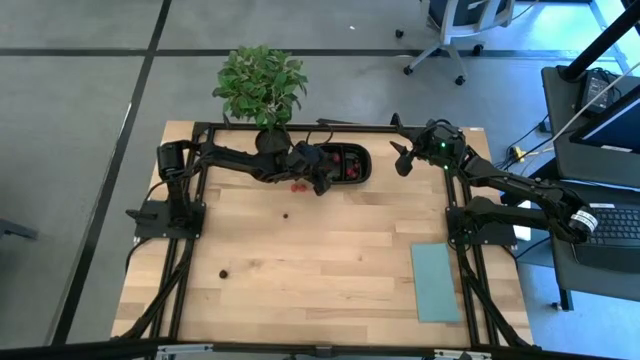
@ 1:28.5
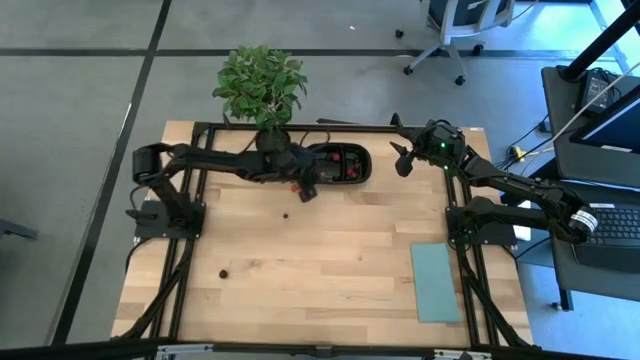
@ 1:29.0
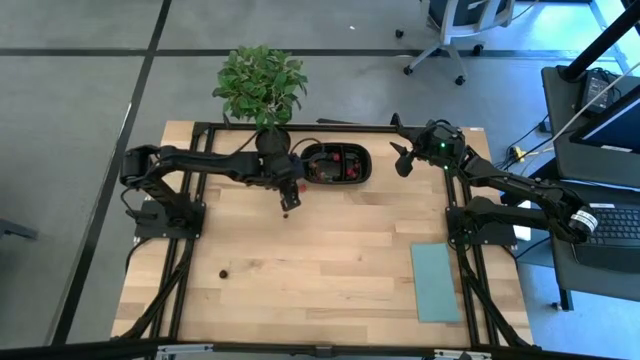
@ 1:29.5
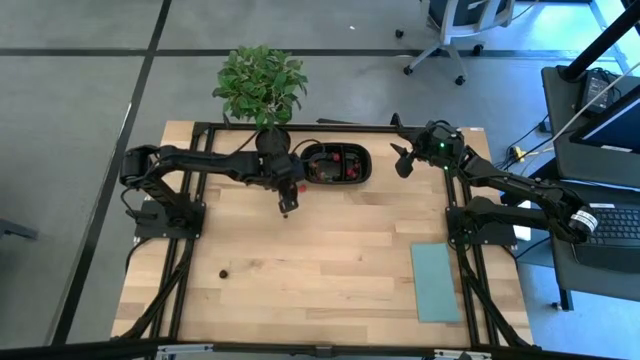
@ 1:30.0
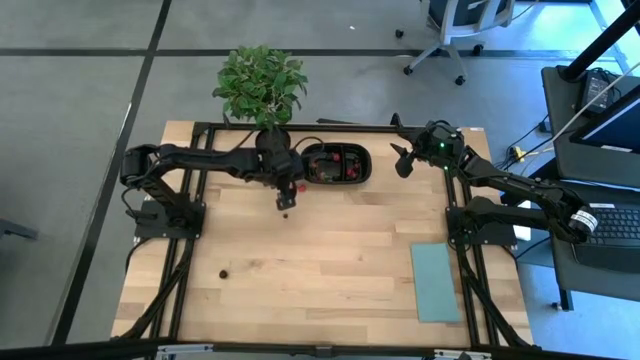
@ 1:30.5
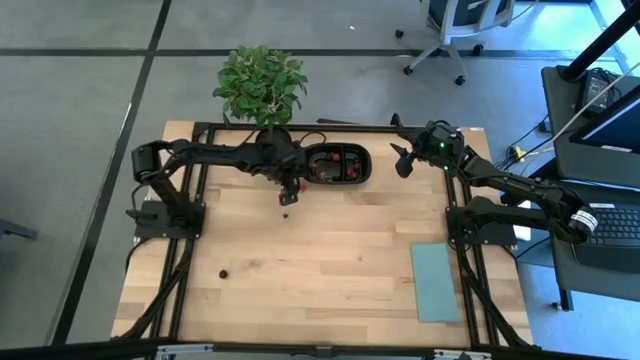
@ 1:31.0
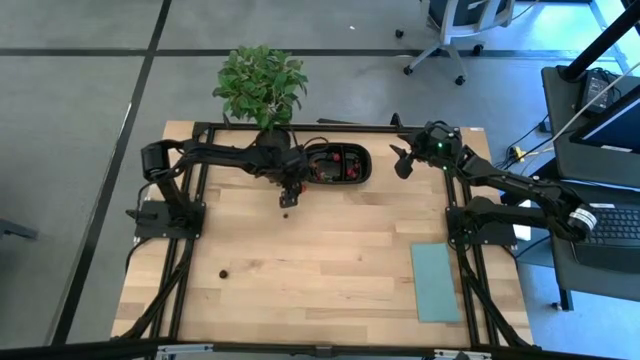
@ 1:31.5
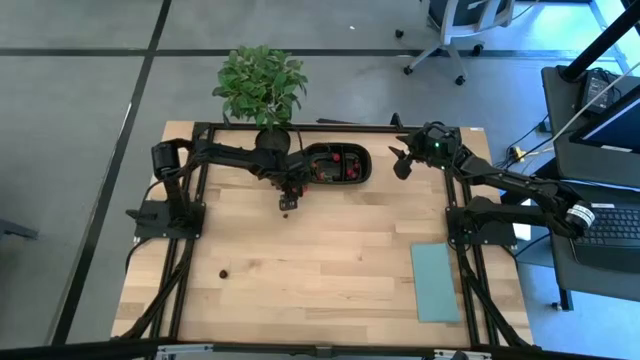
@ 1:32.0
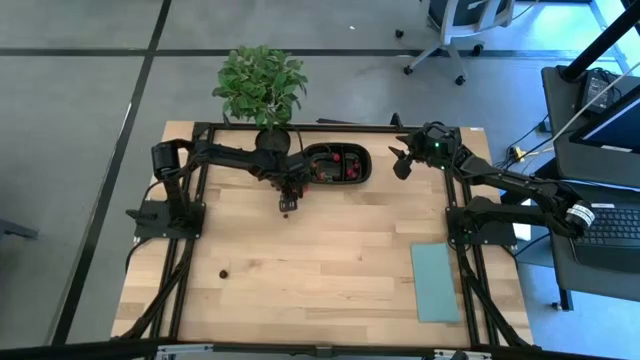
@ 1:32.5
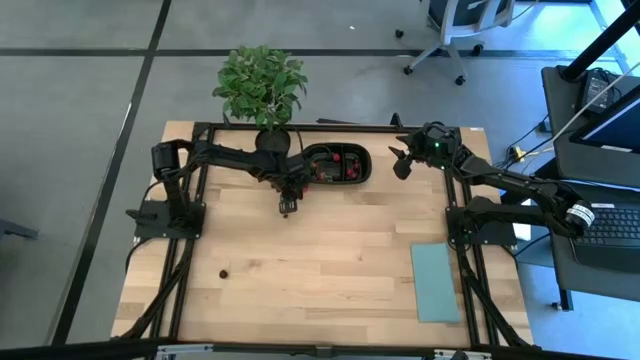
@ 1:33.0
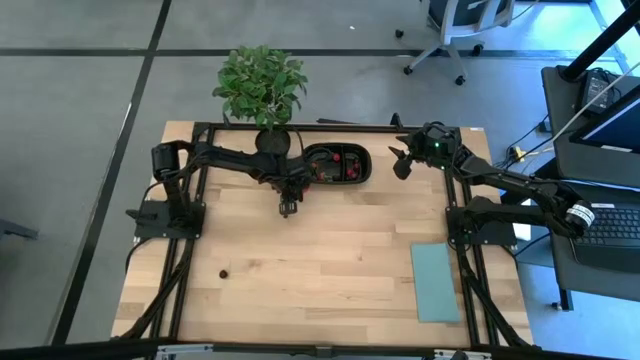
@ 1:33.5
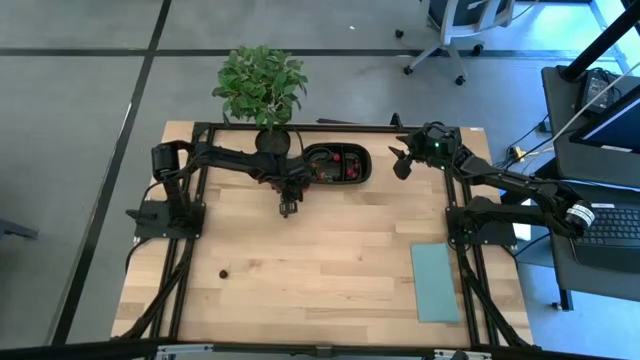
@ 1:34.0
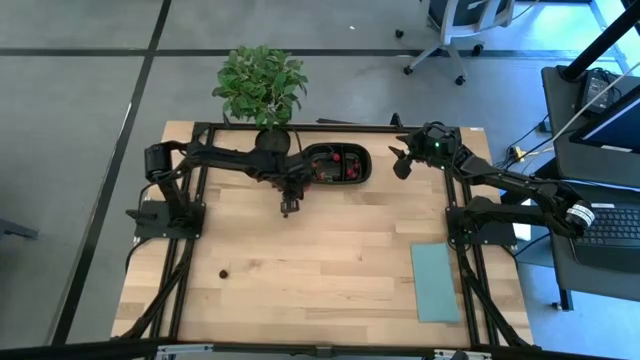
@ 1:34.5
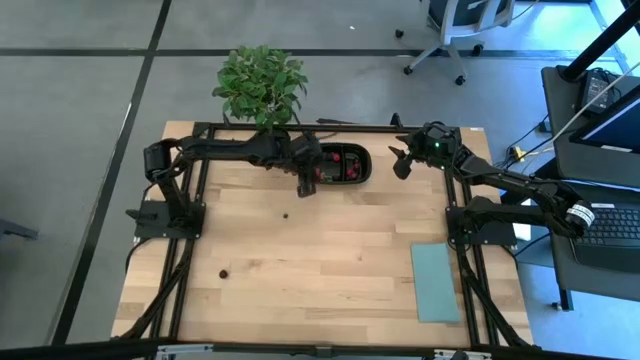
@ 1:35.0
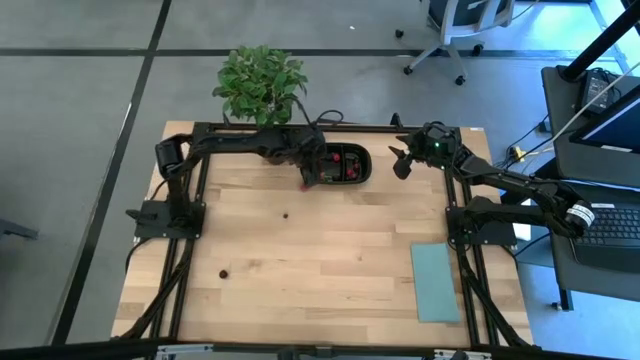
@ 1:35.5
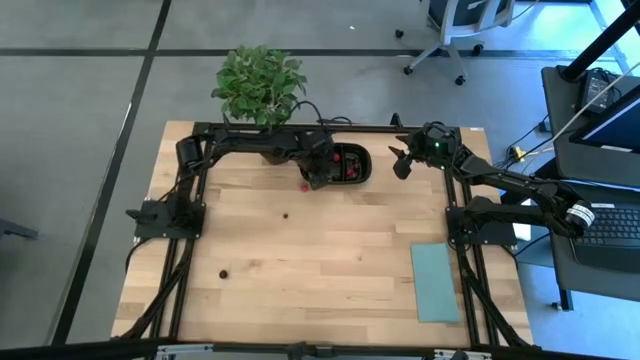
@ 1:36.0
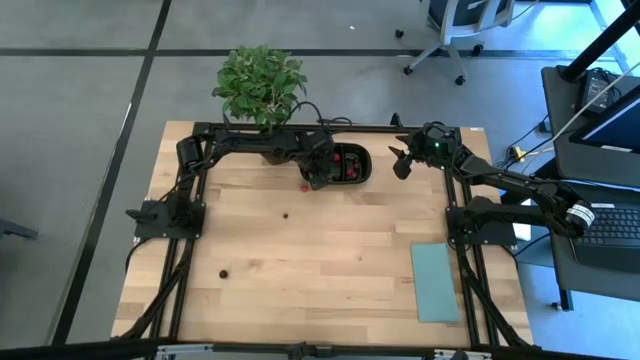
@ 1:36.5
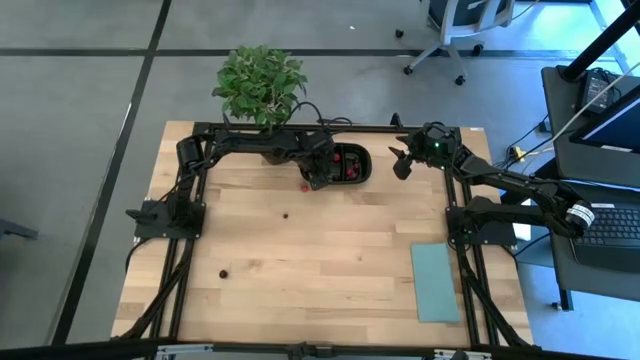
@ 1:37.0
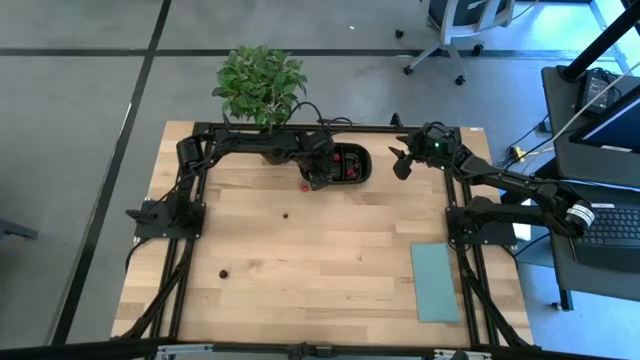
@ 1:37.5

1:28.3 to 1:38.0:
Task: Pick and placing Produce into tupperware
Put the raspberry into the black container

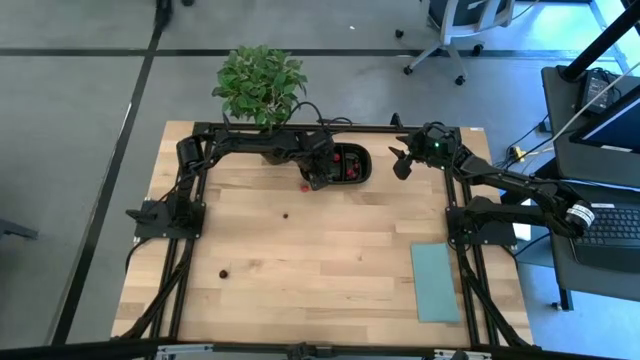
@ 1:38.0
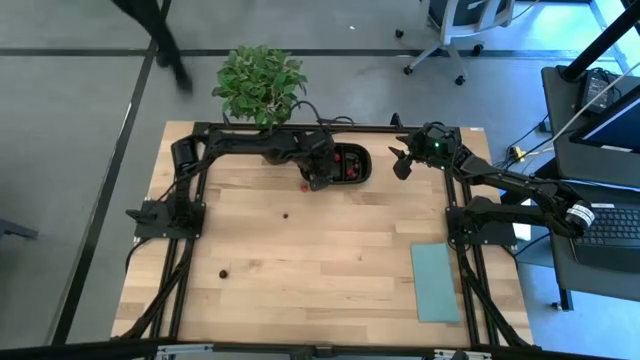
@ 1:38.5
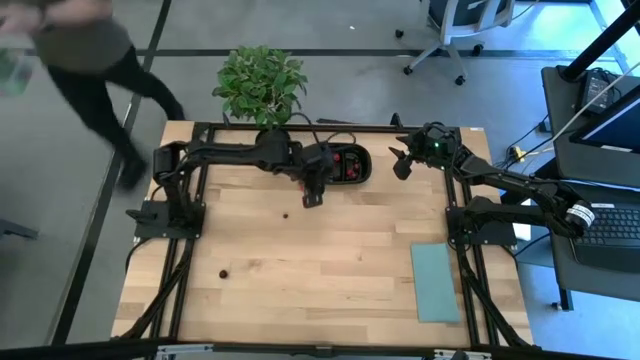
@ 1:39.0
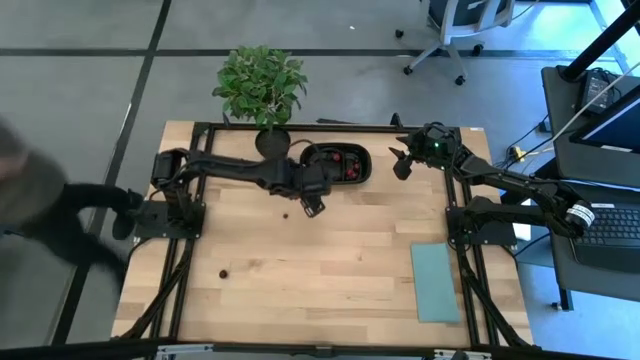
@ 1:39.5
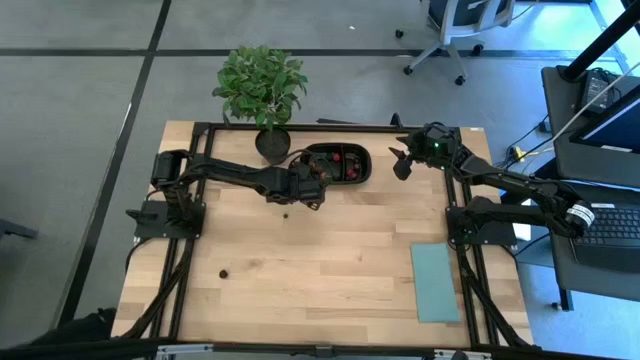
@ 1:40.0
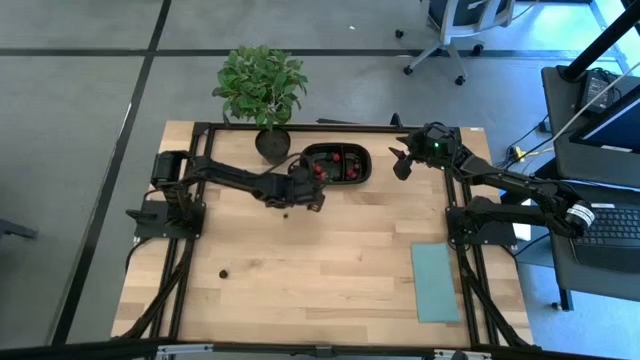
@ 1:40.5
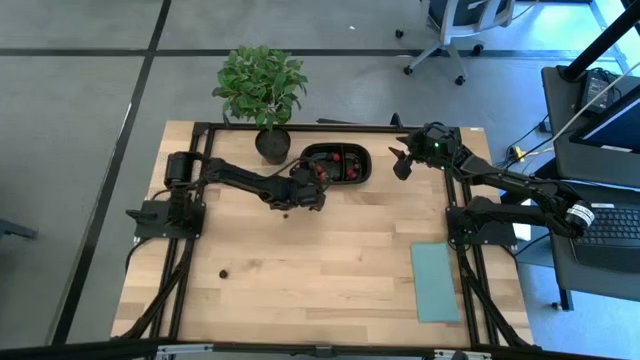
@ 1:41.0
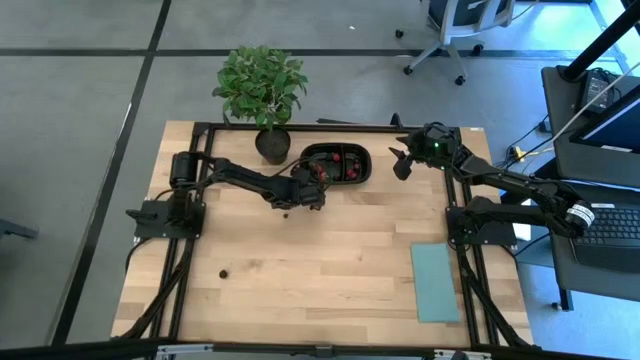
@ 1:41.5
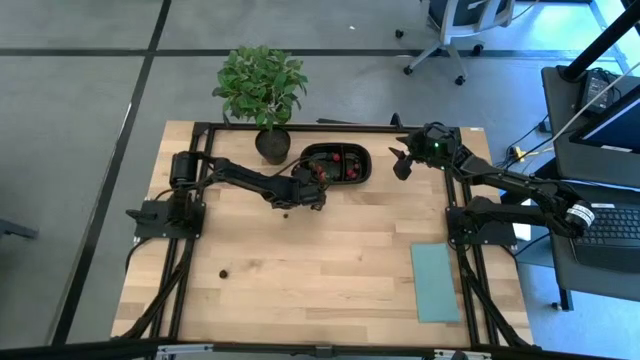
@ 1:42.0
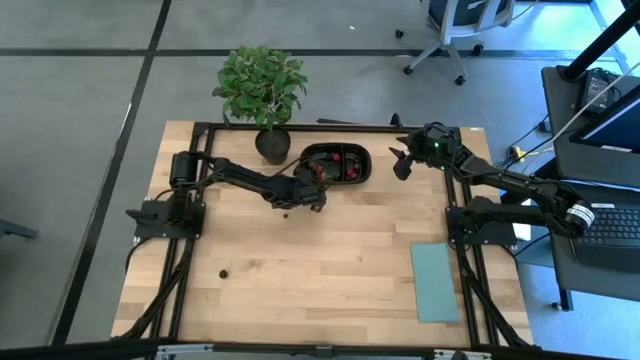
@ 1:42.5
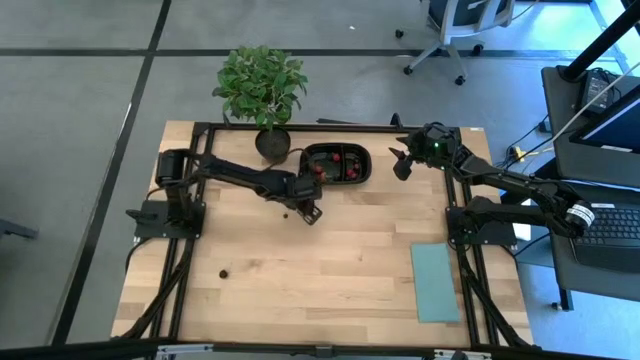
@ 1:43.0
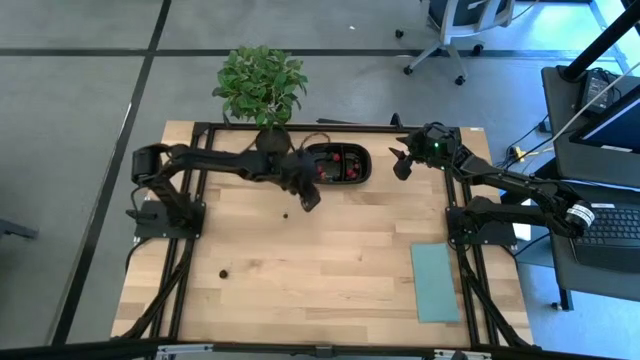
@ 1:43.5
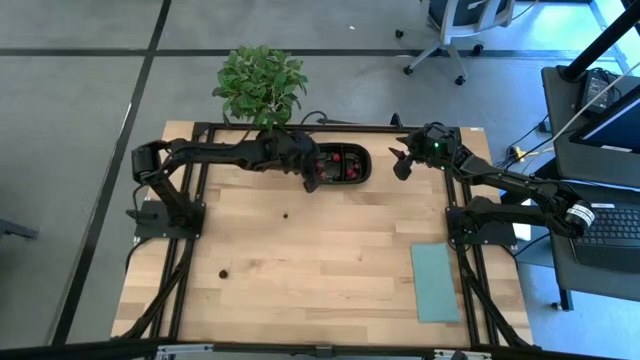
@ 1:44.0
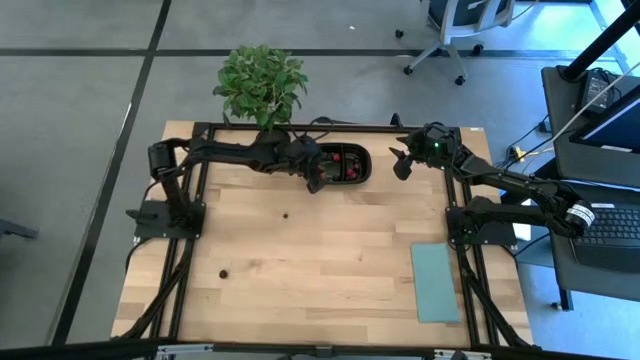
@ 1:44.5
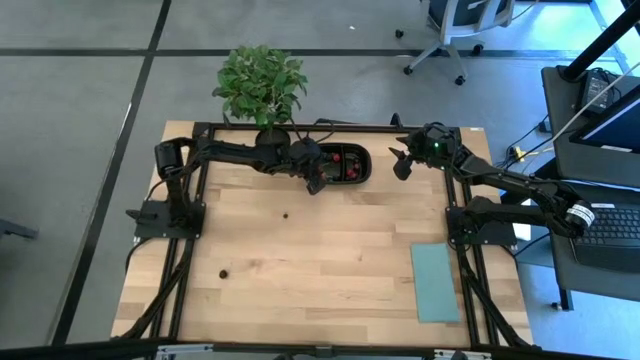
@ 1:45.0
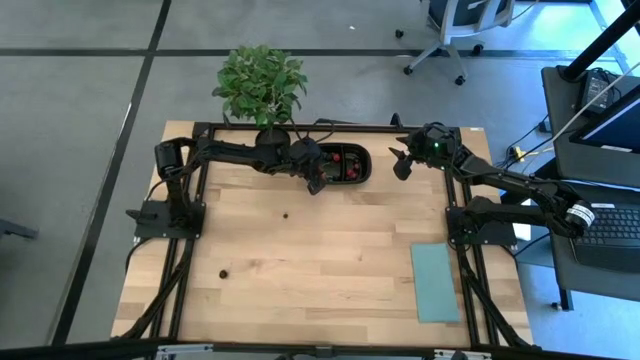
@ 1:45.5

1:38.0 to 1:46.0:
Put the strawberry into the black container

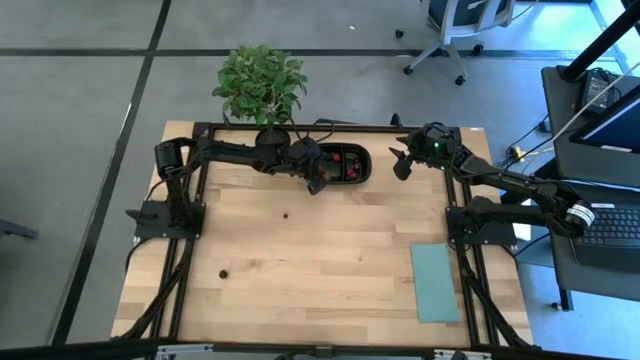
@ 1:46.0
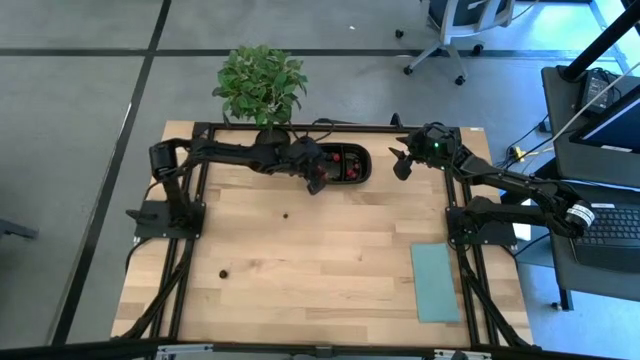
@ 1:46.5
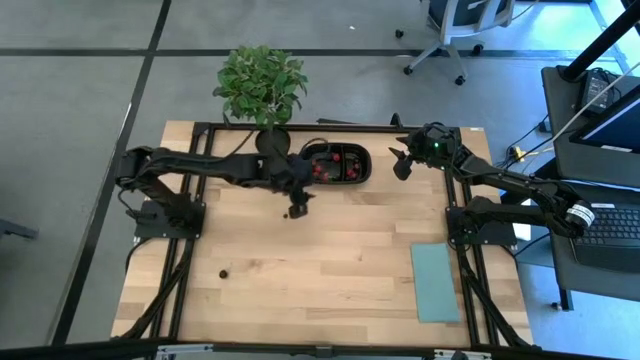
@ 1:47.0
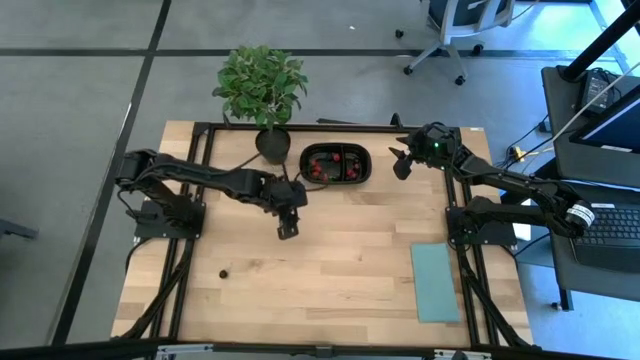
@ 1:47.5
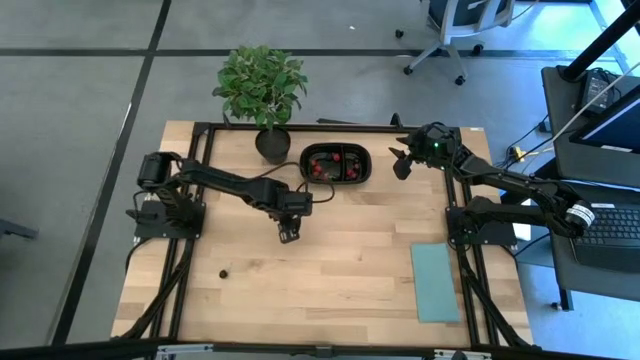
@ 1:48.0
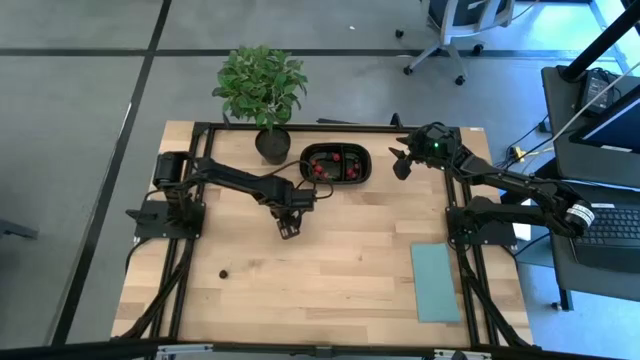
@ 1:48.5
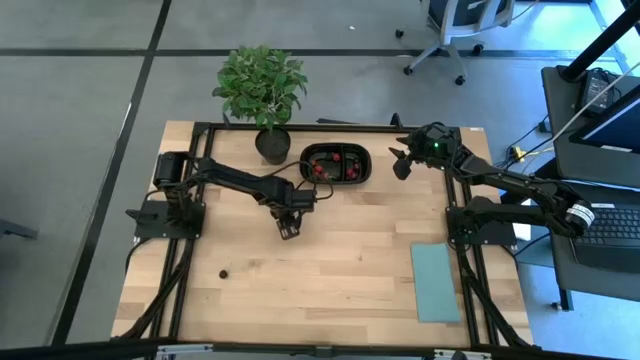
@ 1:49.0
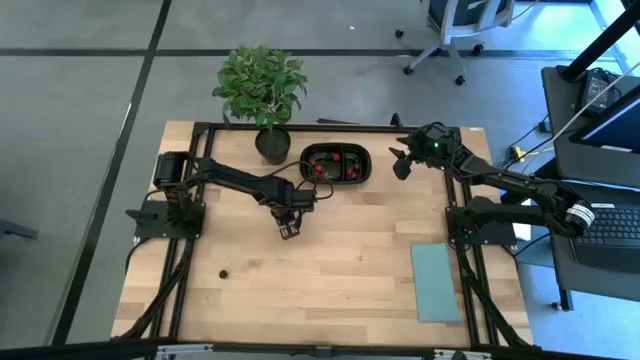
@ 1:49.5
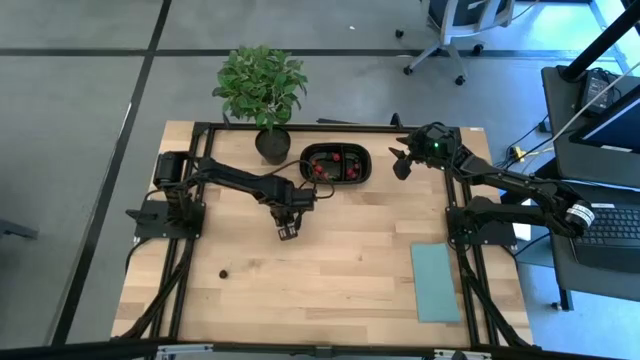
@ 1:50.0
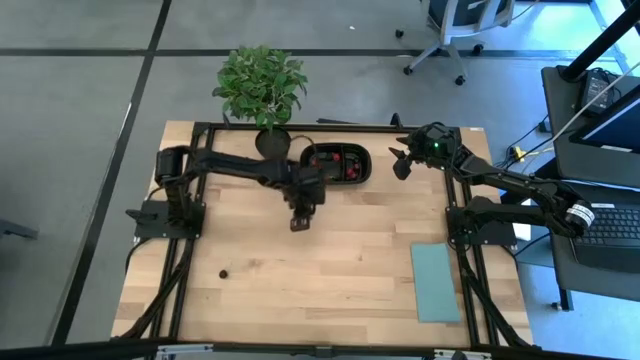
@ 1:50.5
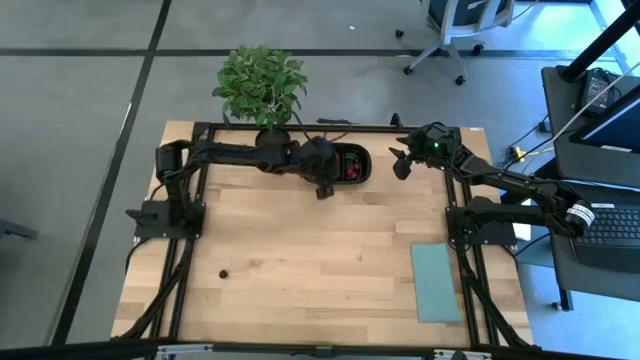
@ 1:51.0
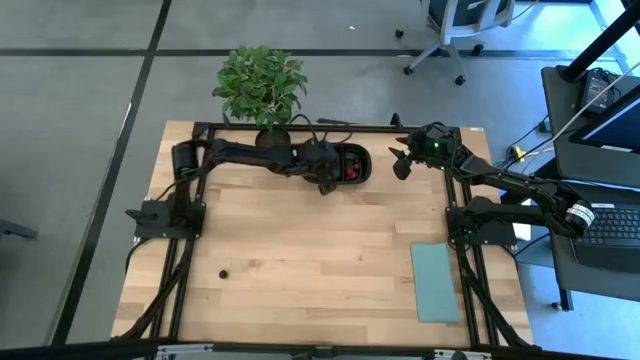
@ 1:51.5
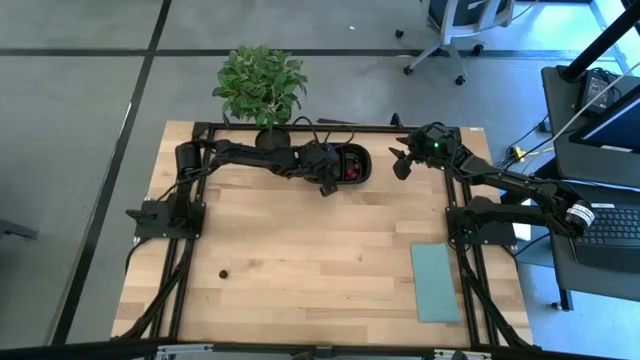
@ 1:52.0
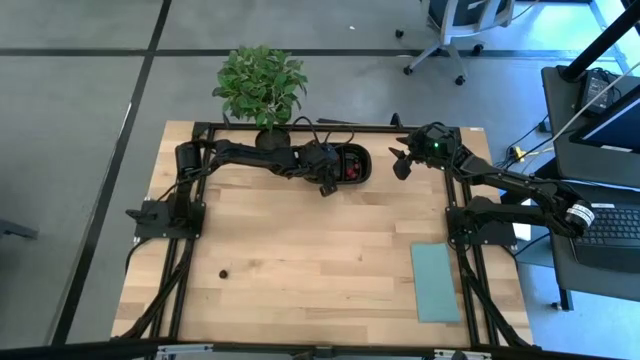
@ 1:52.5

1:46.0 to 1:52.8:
Put the blueberry into the black container
